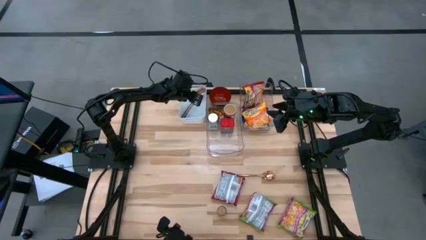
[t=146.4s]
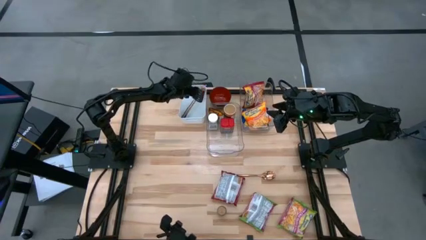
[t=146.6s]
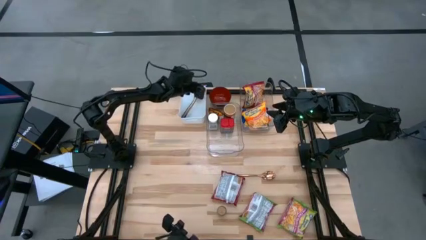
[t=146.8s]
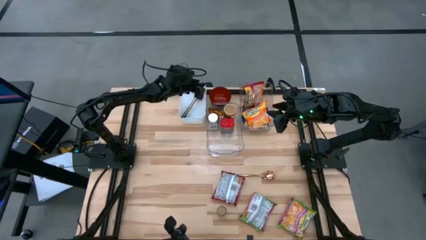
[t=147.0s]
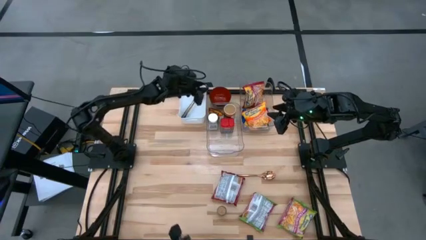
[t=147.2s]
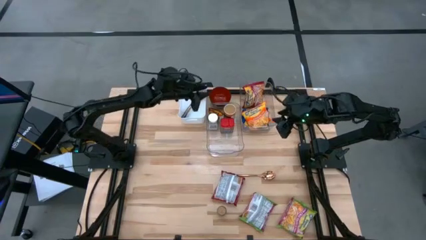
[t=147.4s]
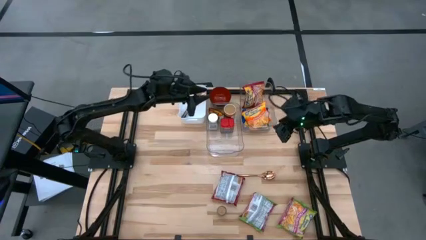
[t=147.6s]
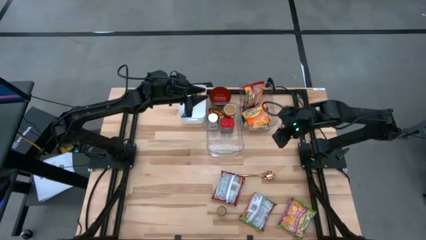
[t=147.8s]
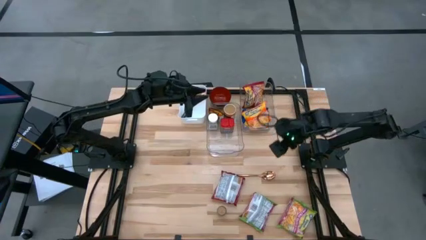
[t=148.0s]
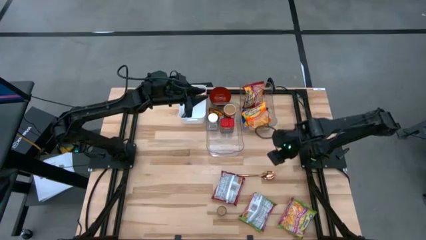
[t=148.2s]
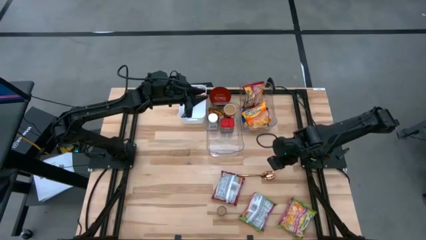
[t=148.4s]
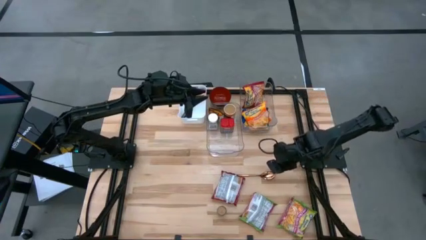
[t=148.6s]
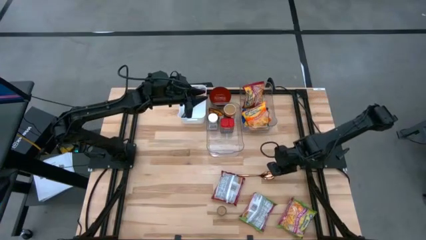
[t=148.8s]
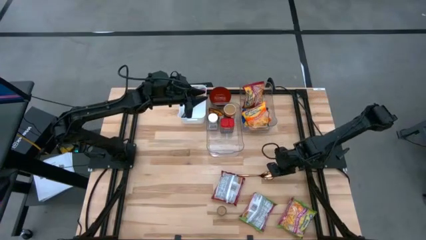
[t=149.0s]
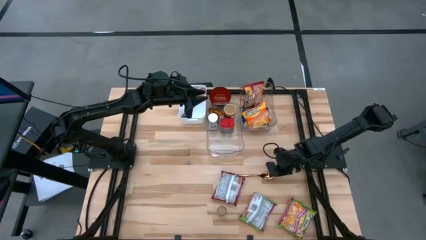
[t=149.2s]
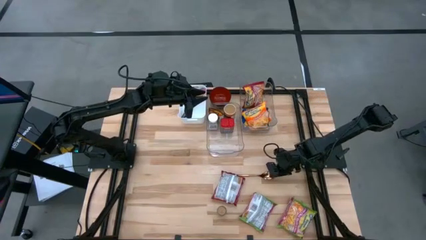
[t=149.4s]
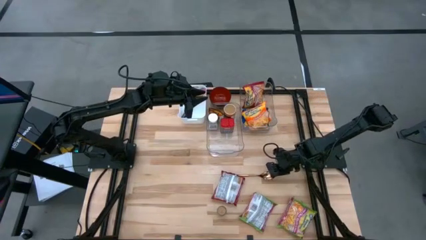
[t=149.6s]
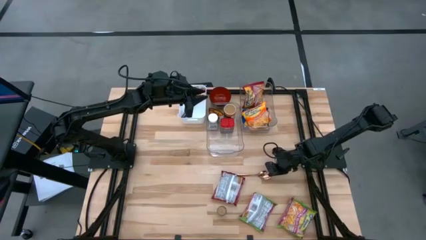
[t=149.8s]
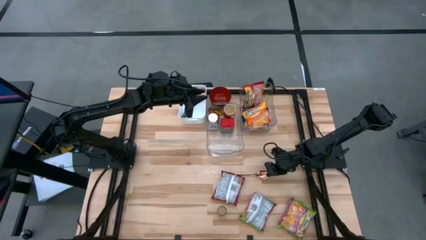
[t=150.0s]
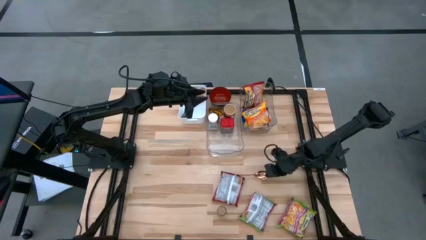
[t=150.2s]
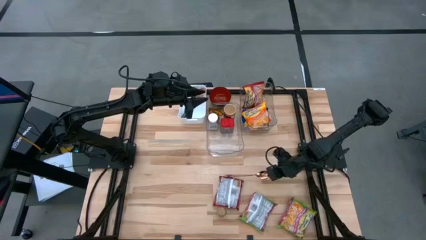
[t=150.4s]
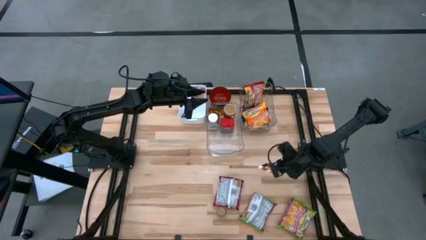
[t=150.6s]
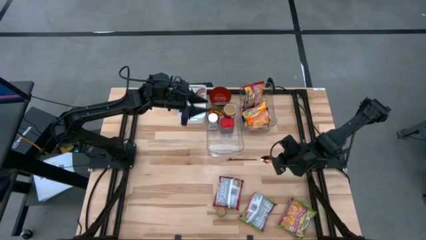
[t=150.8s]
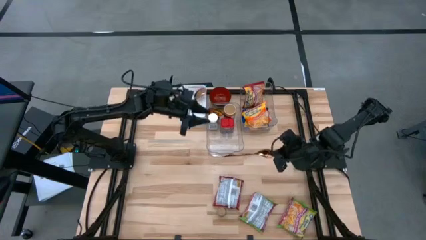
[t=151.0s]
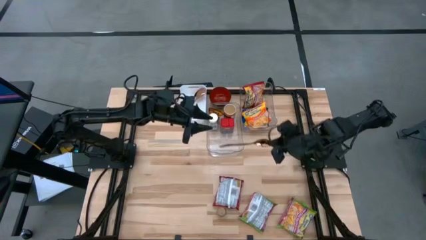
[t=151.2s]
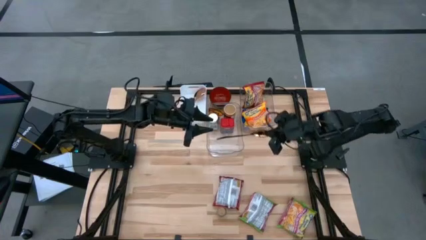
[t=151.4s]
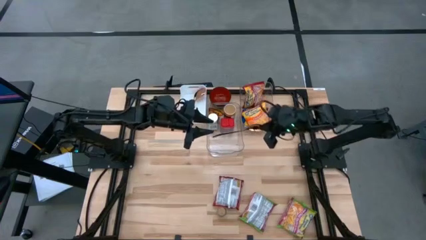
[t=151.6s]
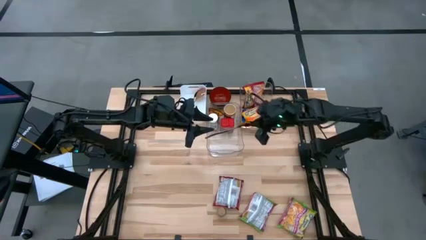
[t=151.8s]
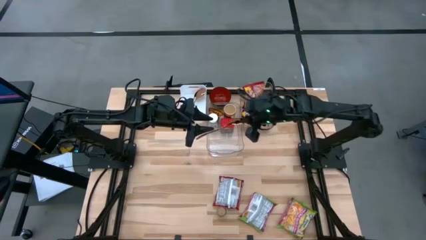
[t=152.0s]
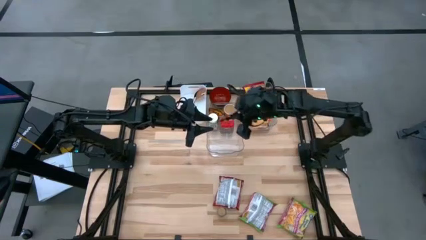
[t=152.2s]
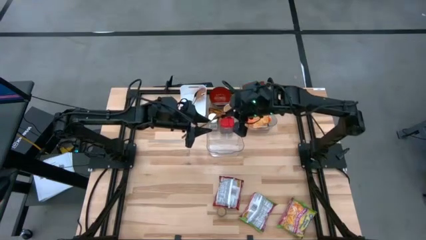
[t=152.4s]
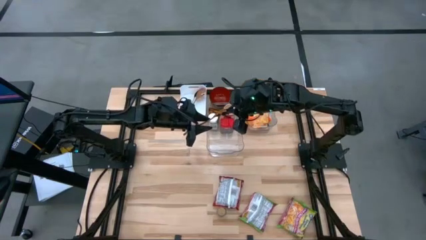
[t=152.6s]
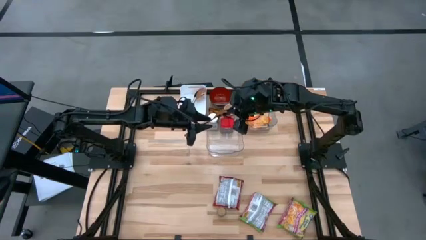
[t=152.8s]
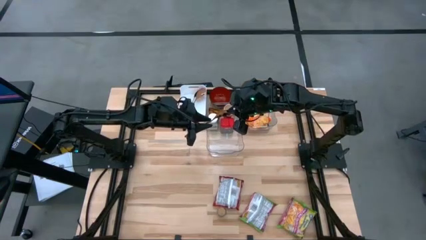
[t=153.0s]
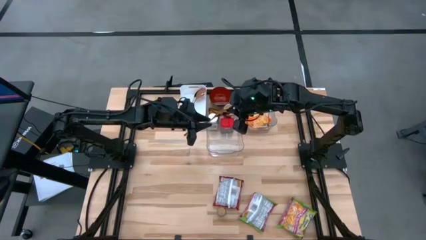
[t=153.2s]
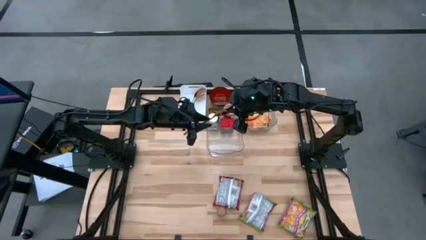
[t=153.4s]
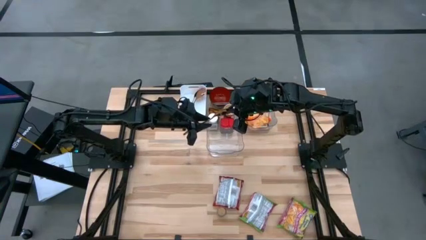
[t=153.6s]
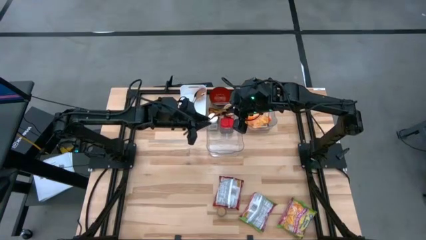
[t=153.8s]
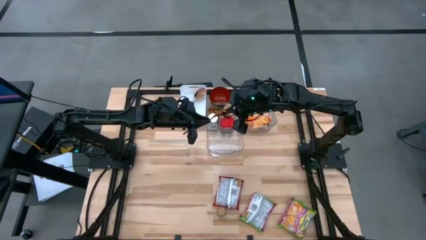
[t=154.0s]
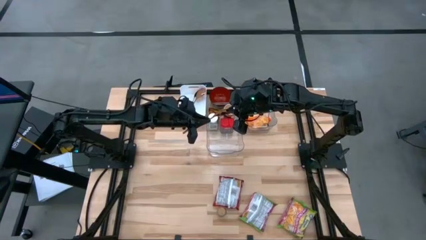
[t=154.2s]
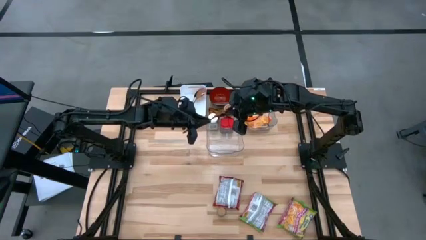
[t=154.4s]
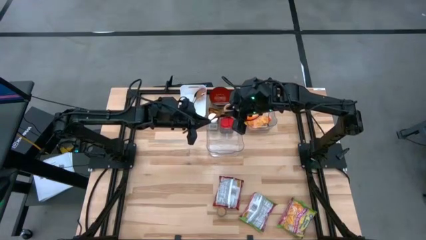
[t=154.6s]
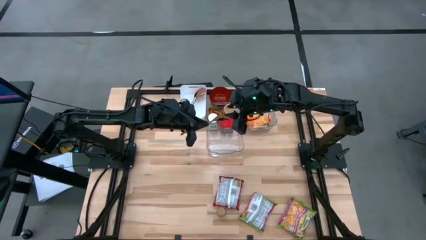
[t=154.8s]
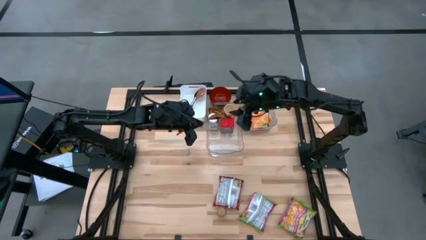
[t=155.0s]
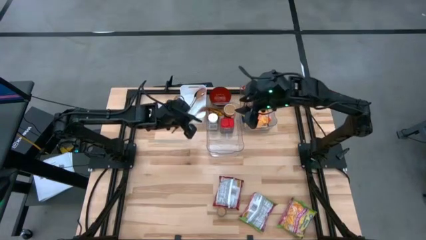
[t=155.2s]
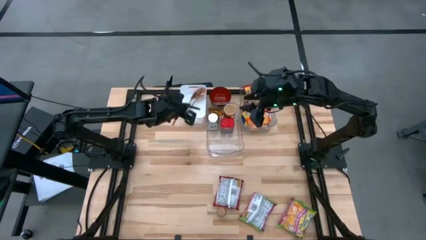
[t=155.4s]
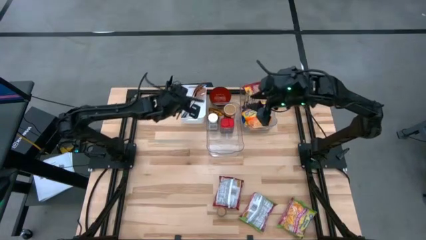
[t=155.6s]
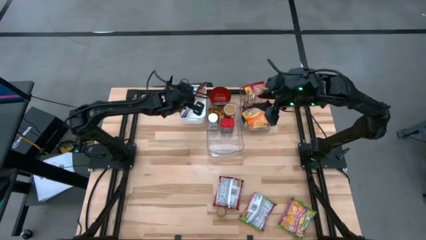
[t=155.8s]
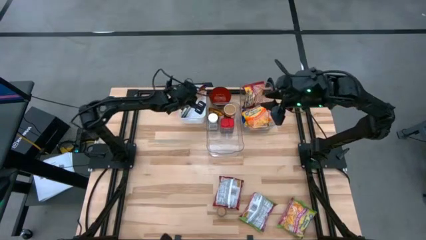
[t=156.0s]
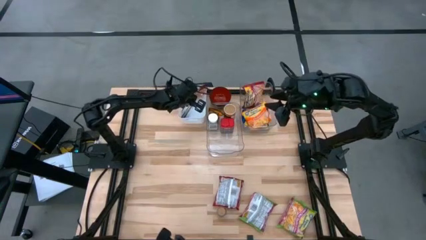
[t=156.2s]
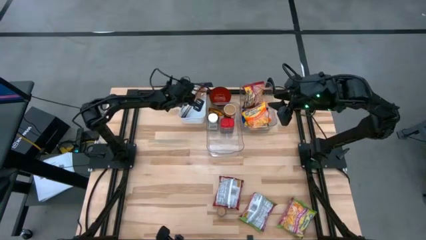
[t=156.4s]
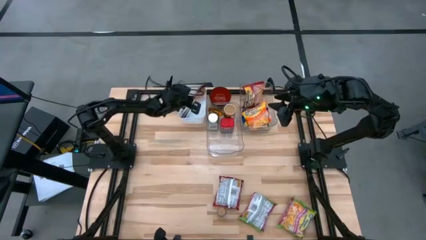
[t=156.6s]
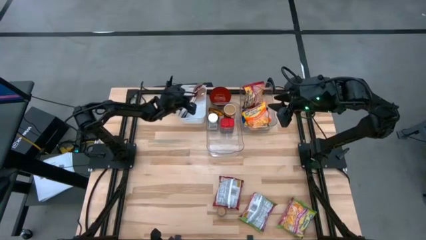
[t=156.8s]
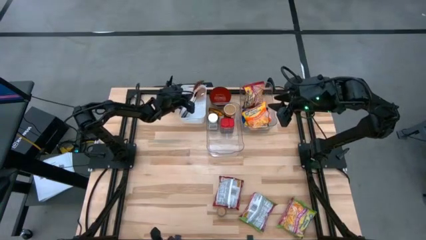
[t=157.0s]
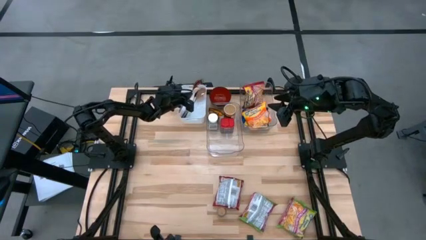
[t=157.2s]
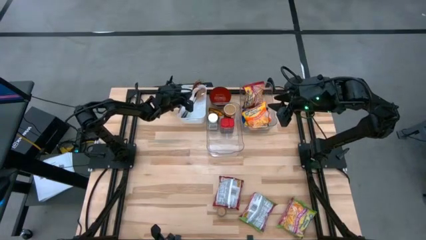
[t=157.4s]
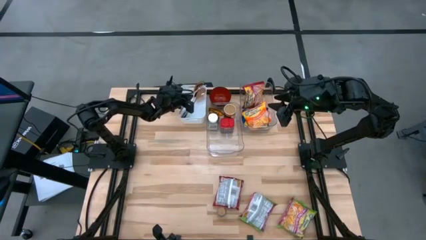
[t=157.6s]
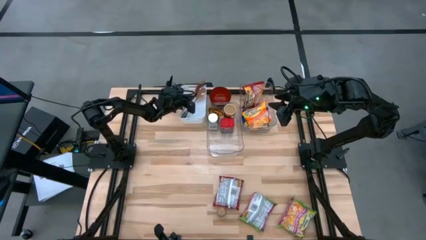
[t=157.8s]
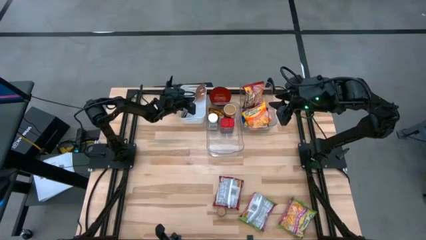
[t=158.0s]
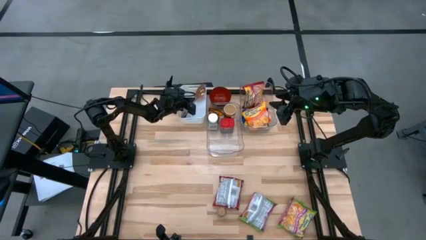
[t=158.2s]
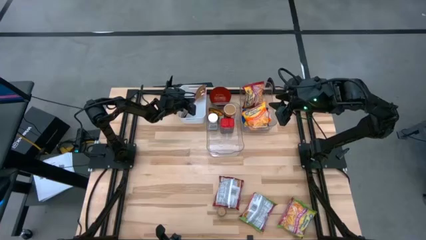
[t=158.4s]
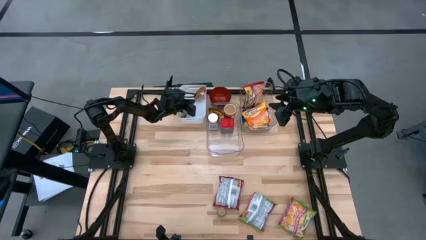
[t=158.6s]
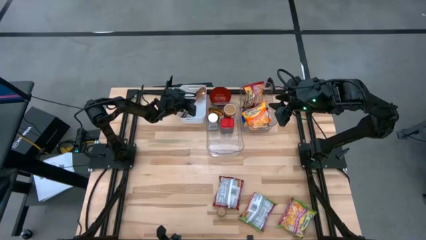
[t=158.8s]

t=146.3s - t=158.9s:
Task: Pick & Place Food Item
Put the gold spoon into the white bin
